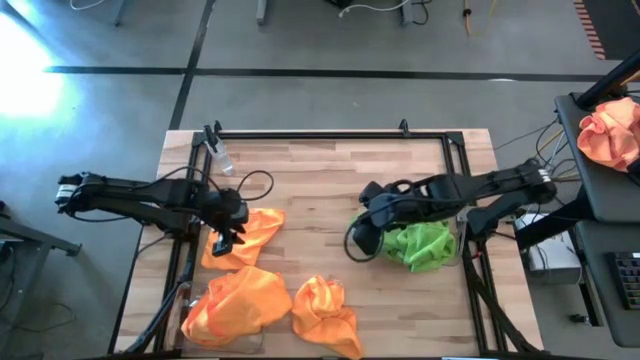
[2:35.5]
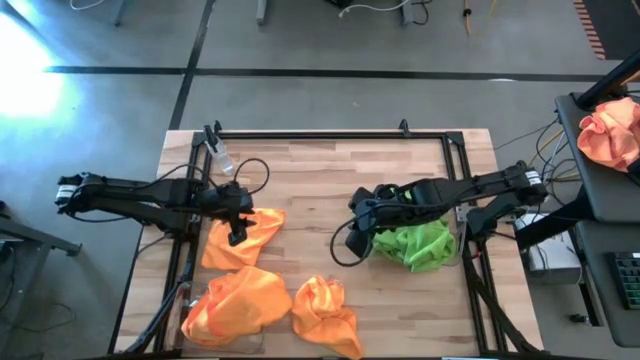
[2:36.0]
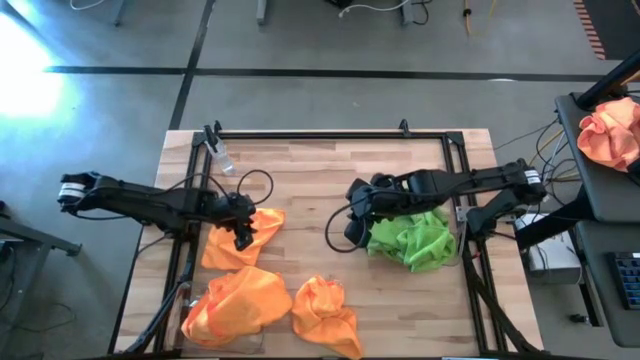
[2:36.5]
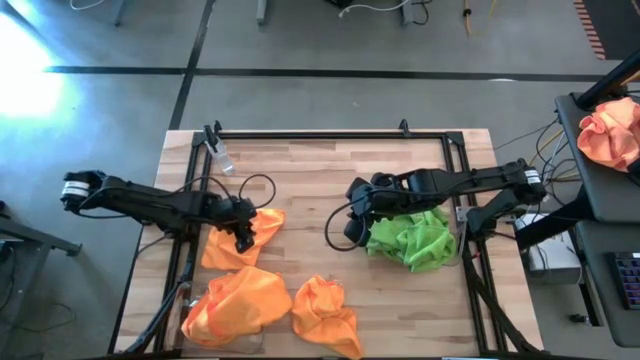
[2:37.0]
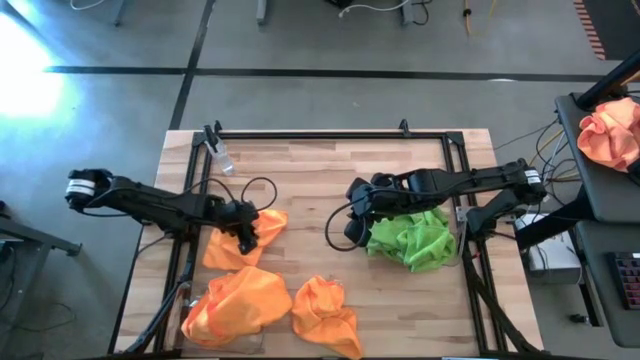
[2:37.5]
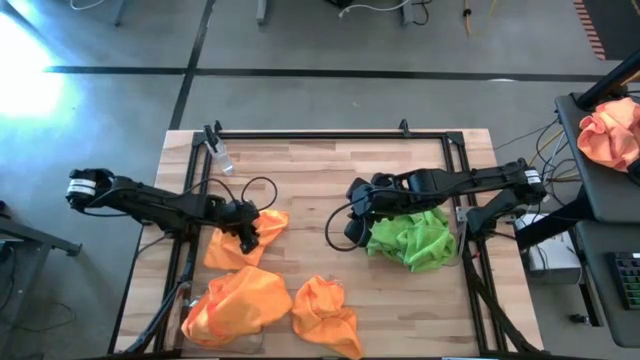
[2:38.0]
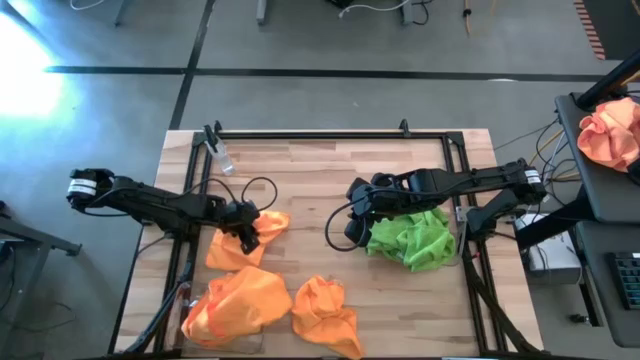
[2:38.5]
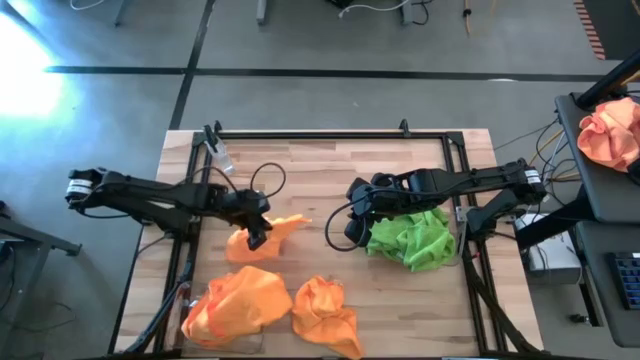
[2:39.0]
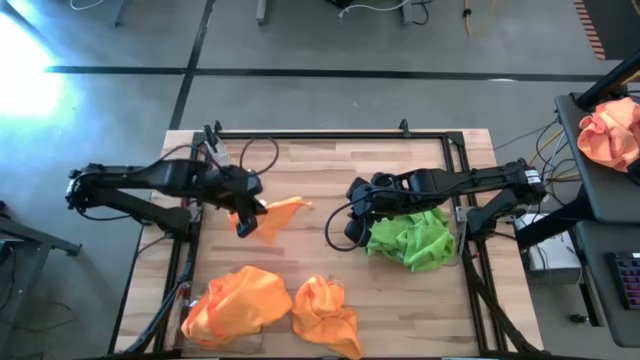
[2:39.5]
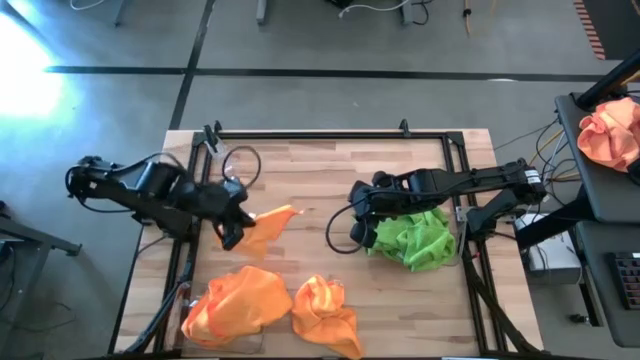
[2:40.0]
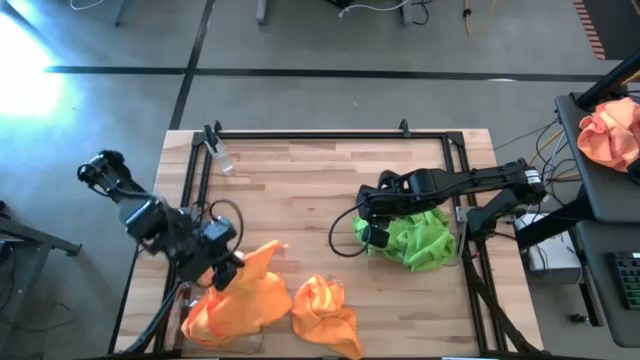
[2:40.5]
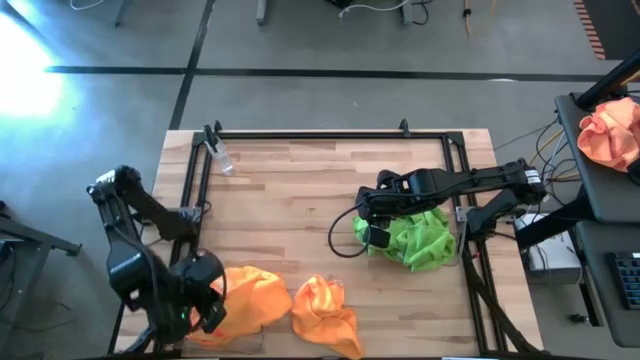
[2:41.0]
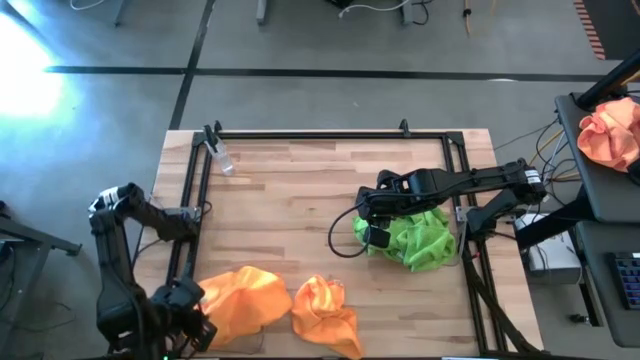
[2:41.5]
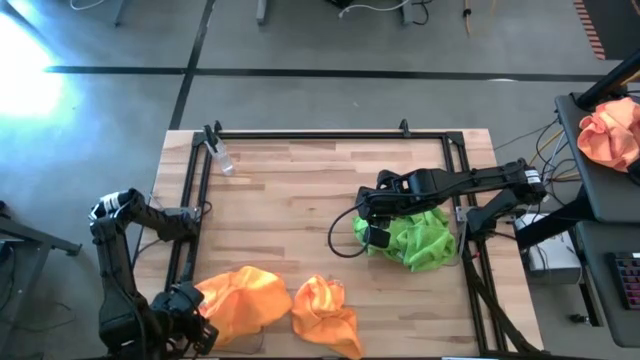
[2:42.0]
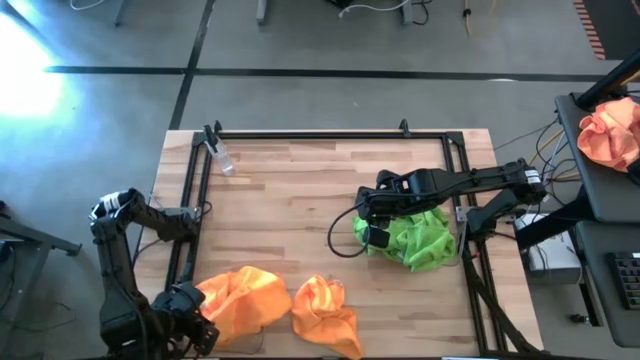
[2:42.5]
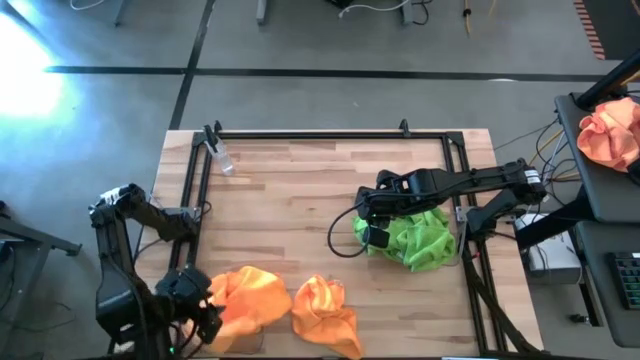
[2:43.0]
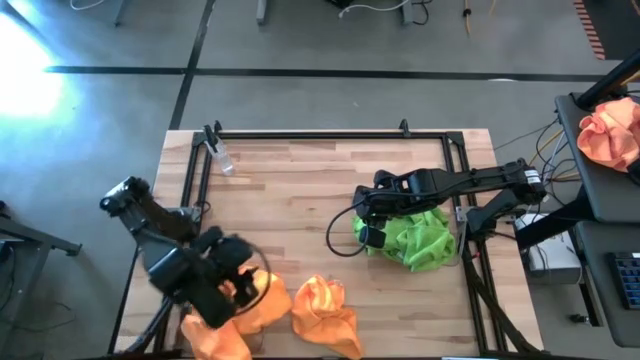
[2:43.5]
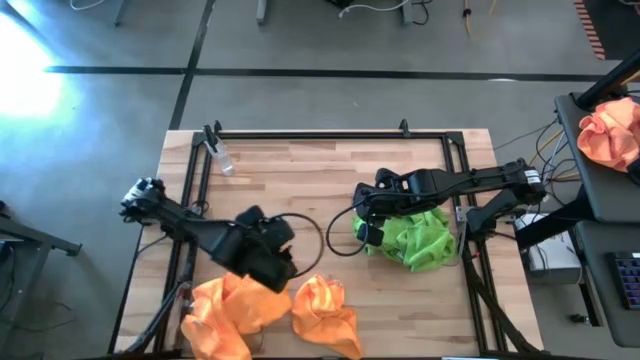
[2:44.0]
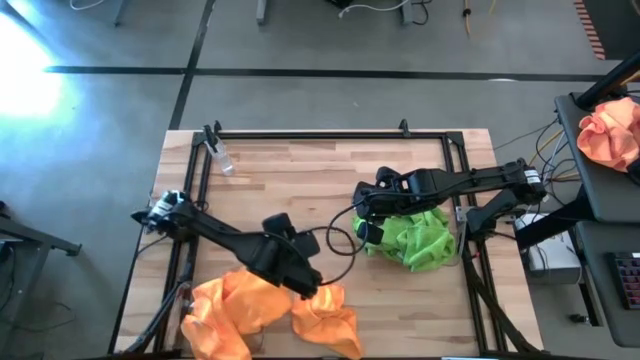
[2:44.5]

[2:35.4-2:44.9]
Task: Sort microfiber towel by color & place in baskets
Put the left yellow towel into the left transparent bin

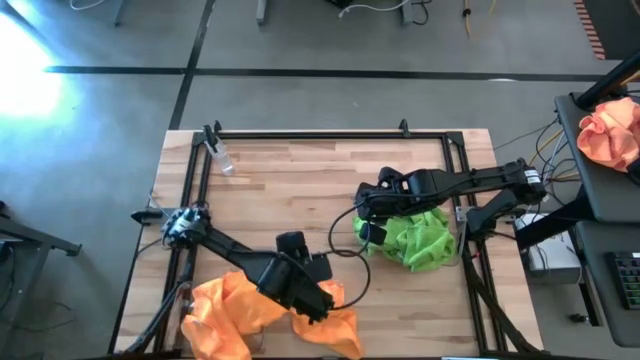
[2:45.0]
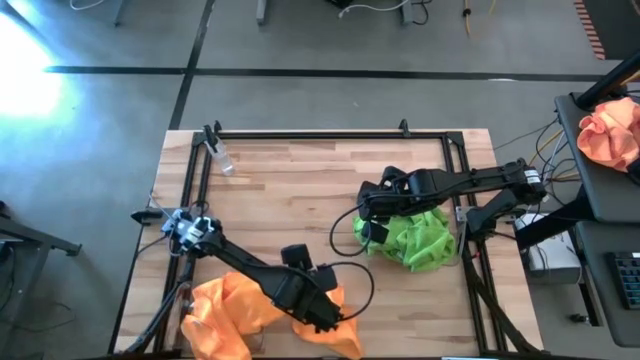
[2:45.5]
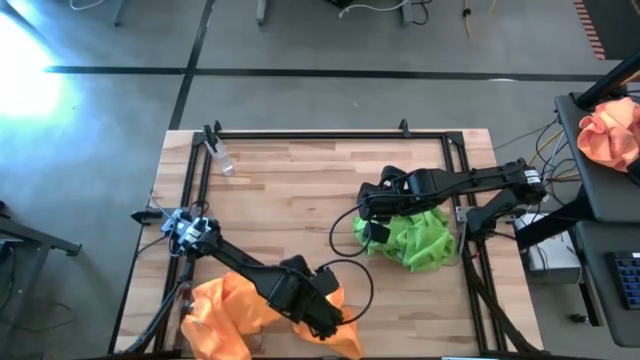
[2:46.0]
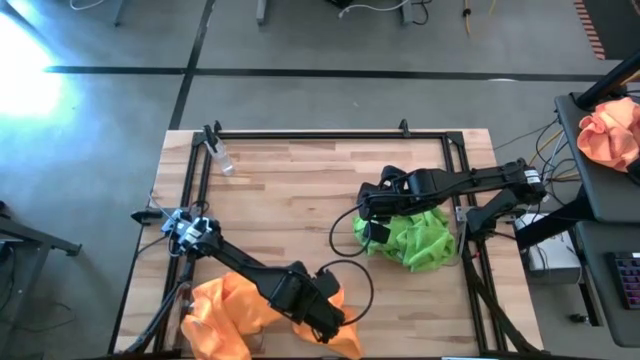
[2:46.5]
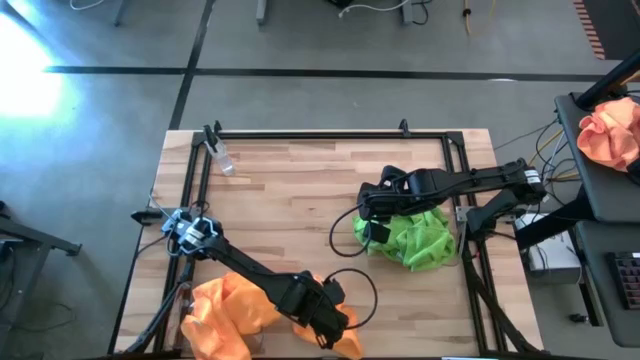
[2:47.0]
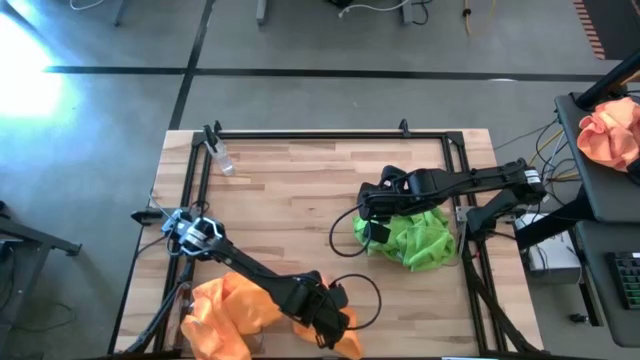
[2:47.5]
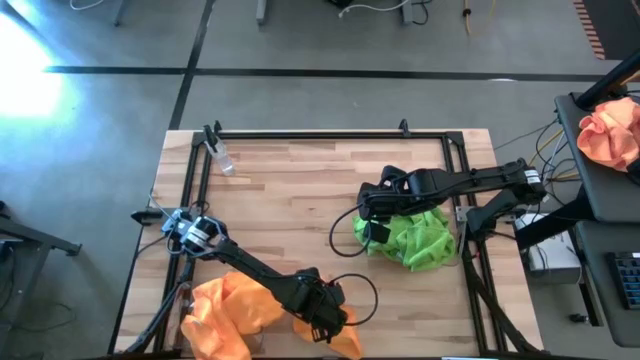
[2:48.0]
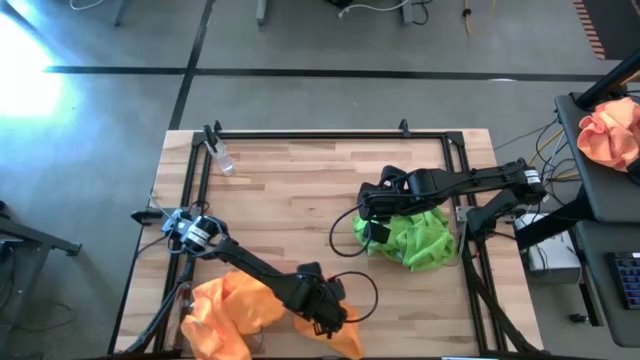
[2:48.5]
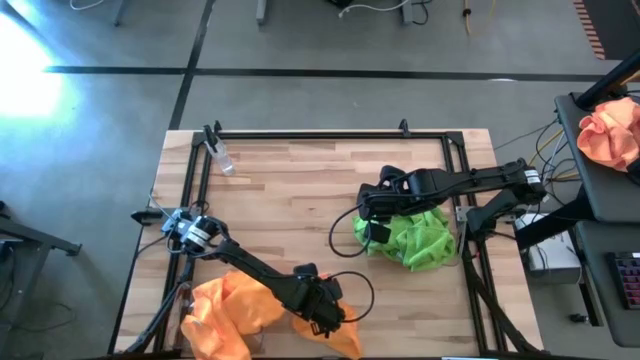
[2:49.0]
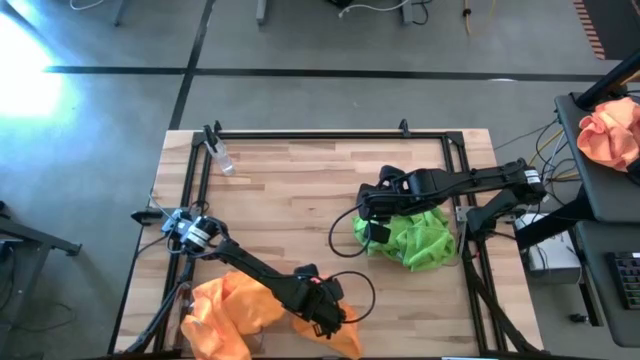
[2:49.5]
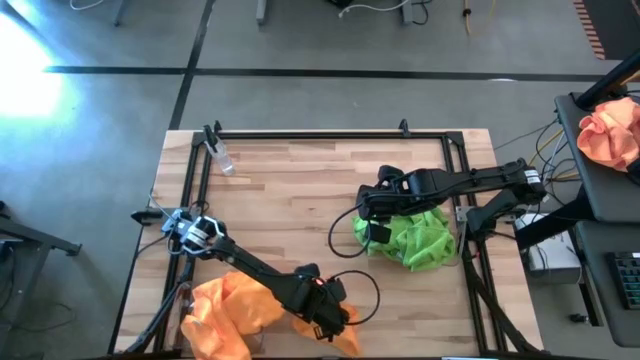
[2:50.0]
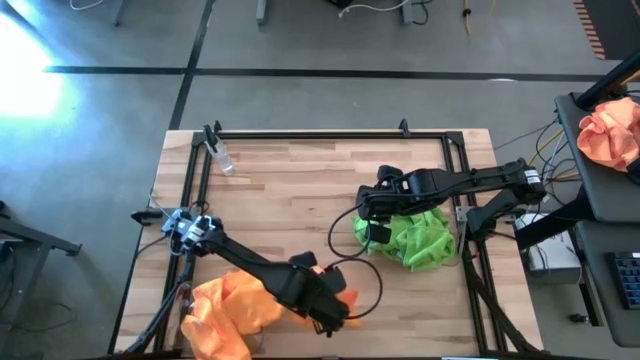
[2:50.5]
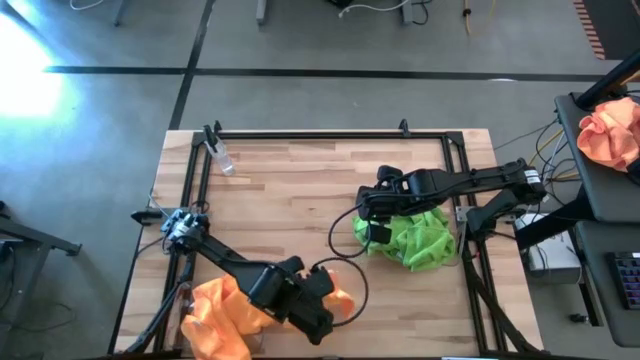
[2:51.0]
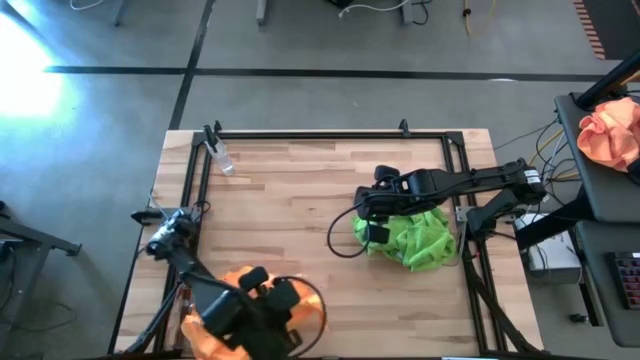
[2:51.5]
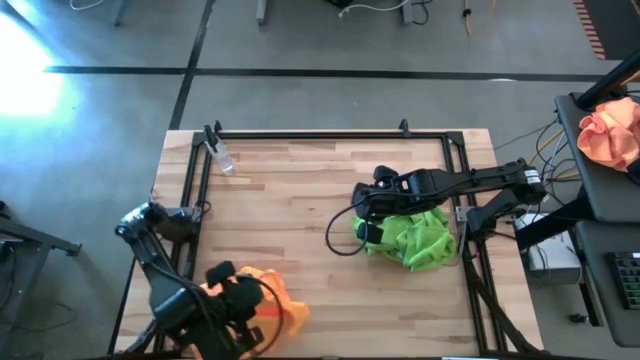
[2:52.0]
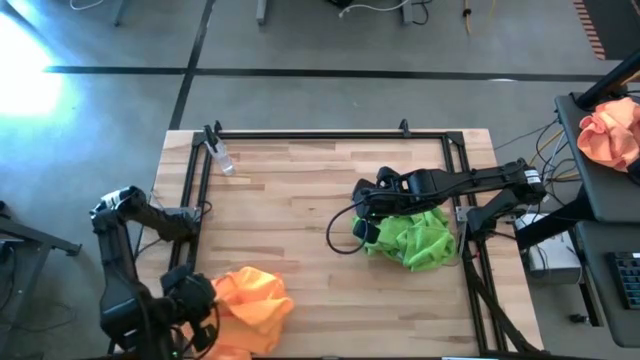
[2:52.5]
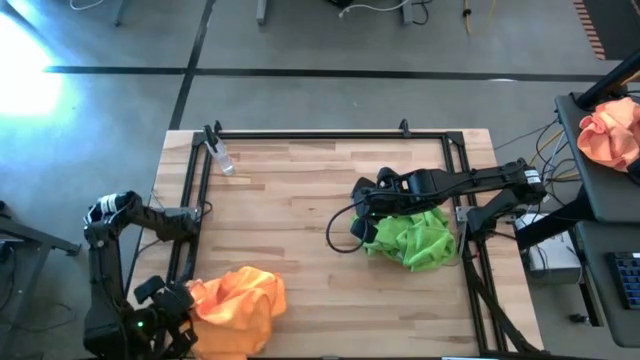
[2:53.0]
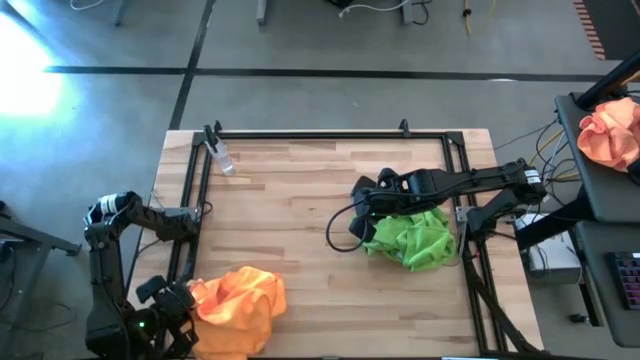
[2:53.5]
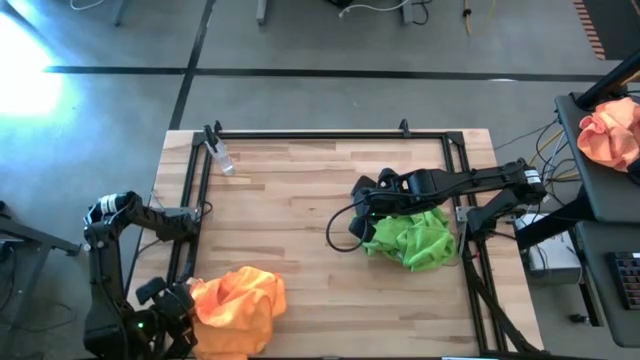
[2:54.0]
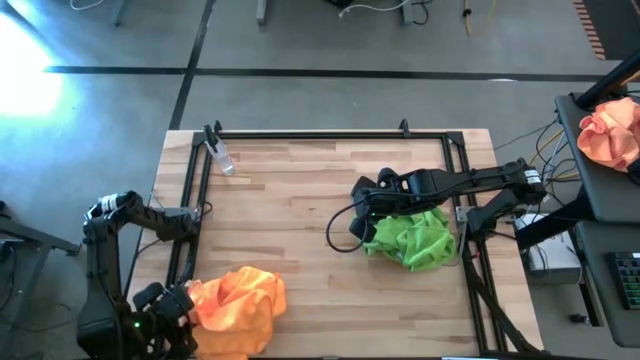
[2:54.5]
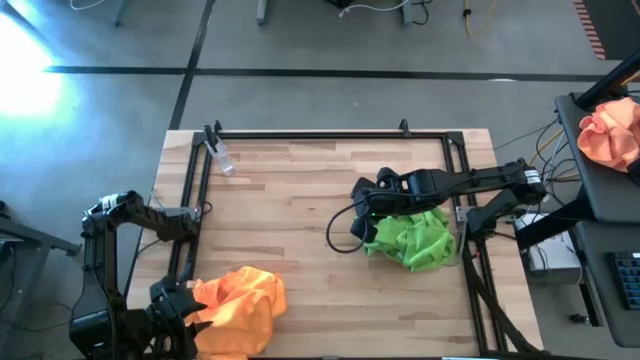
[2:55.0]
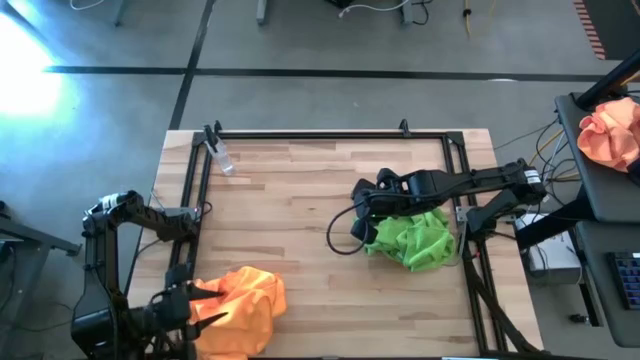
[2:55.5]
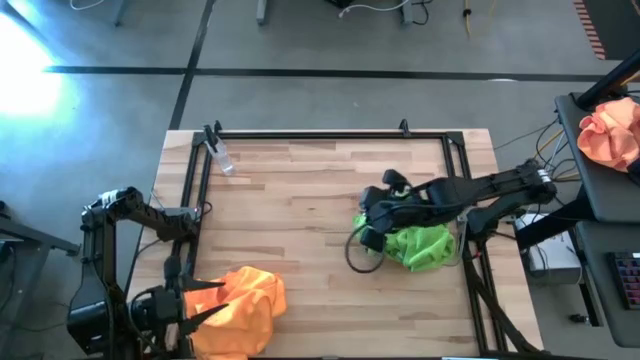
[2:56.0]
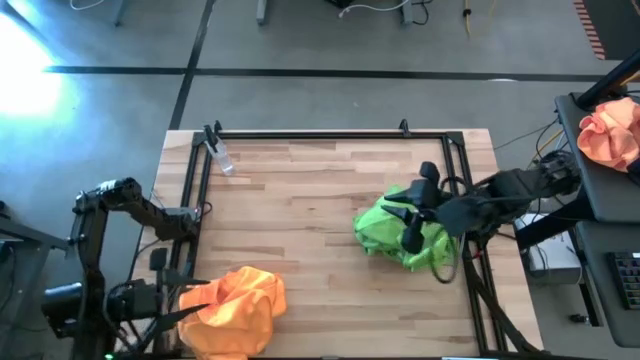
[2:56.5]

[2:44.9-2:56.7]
Put the yellow towel into the left transparent bin
